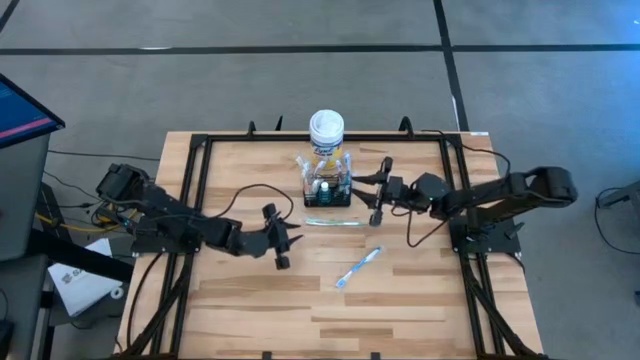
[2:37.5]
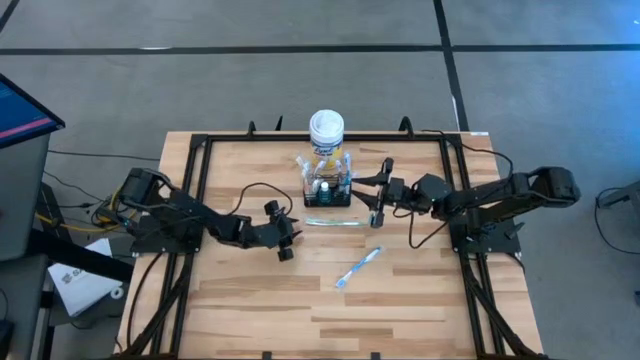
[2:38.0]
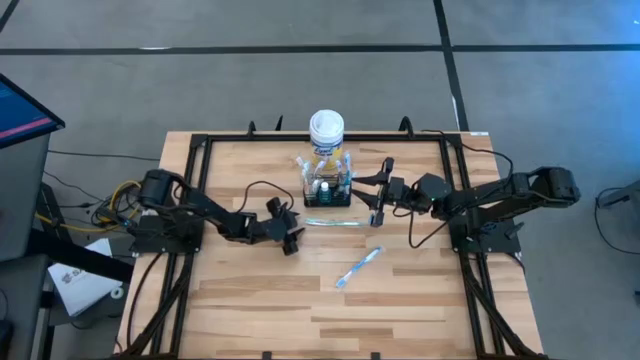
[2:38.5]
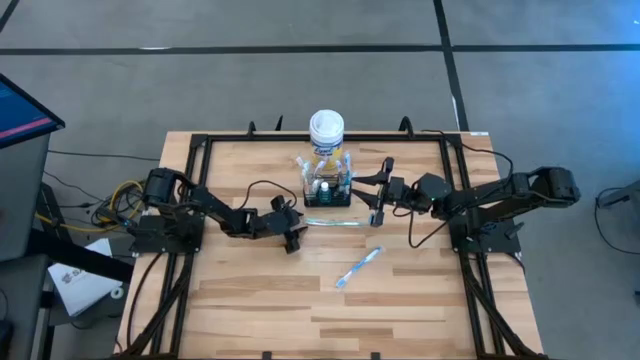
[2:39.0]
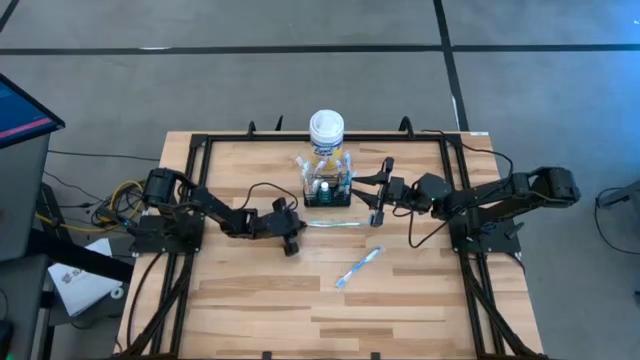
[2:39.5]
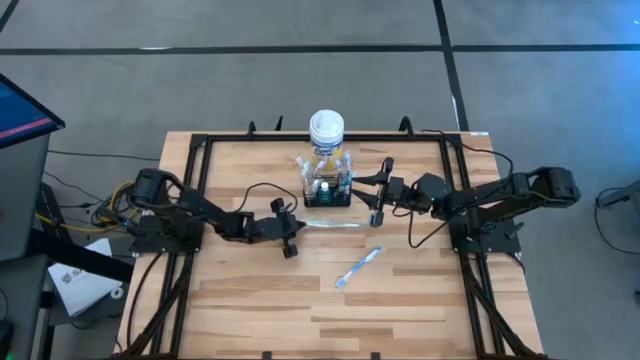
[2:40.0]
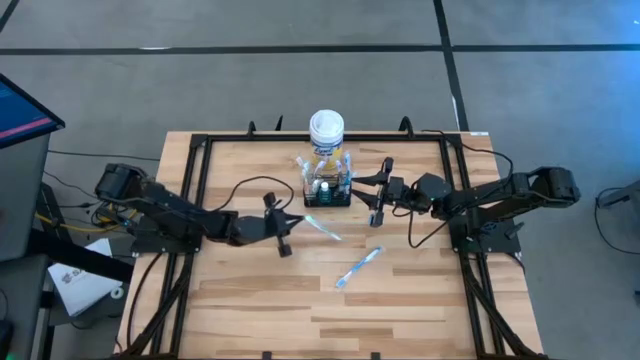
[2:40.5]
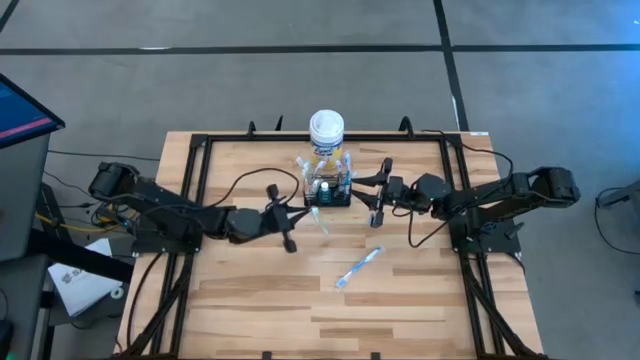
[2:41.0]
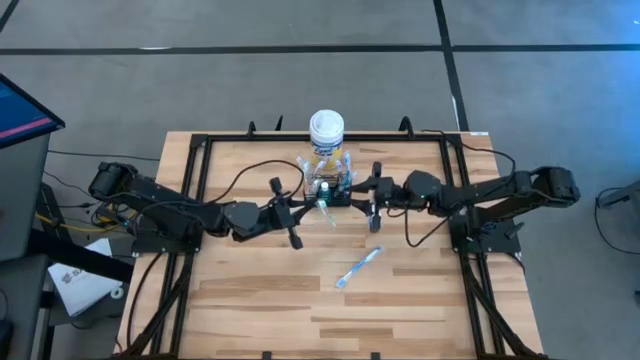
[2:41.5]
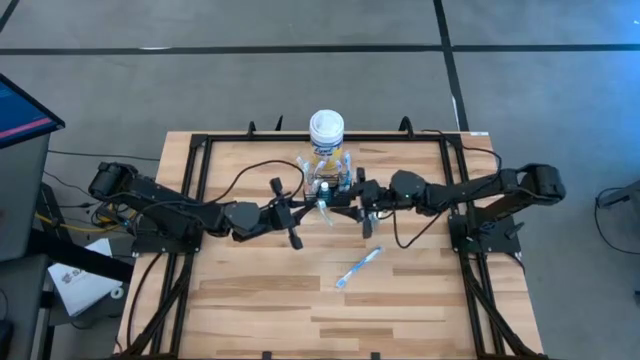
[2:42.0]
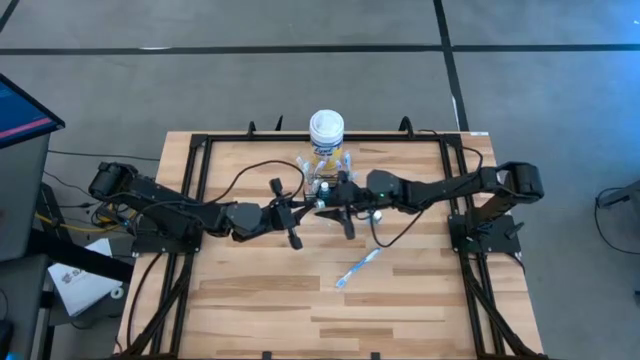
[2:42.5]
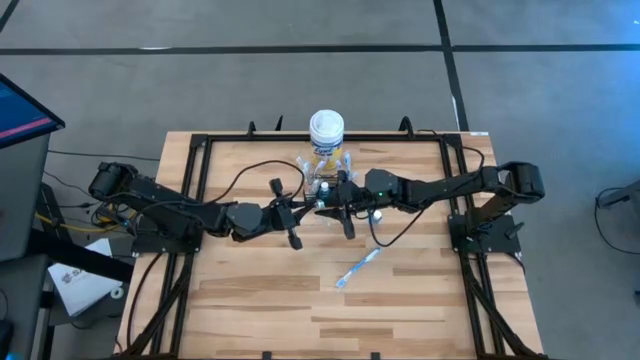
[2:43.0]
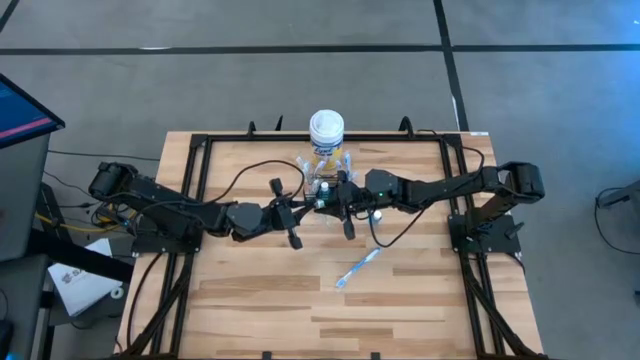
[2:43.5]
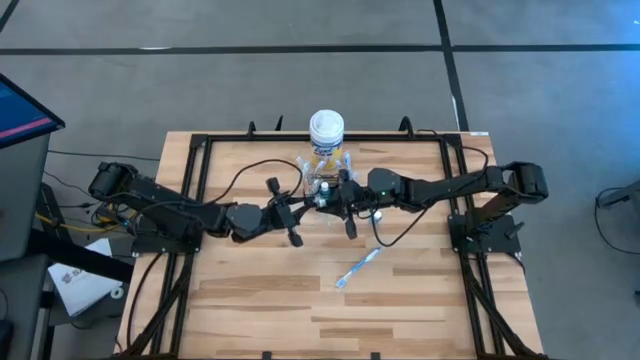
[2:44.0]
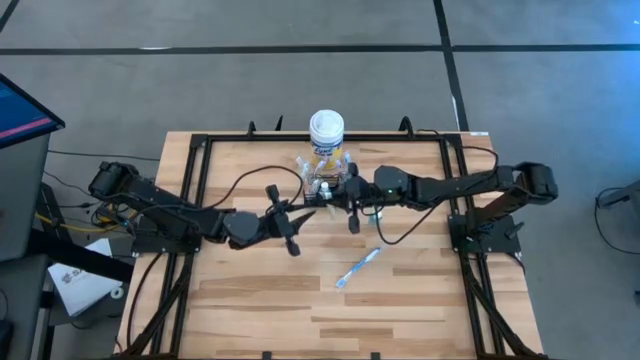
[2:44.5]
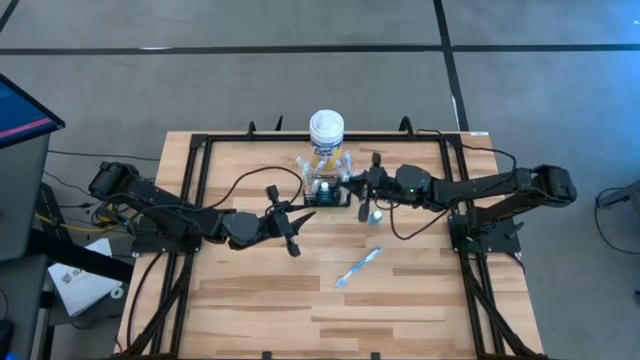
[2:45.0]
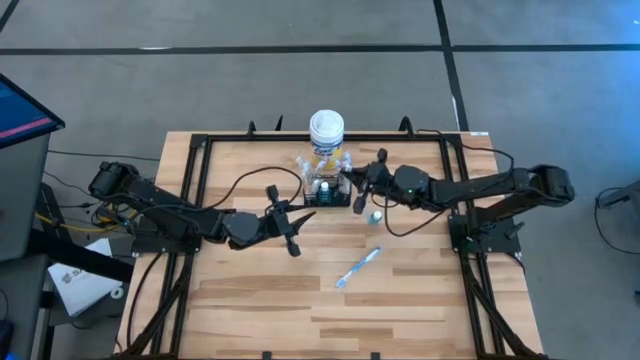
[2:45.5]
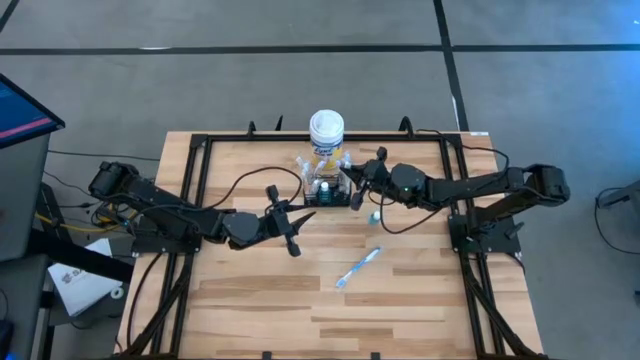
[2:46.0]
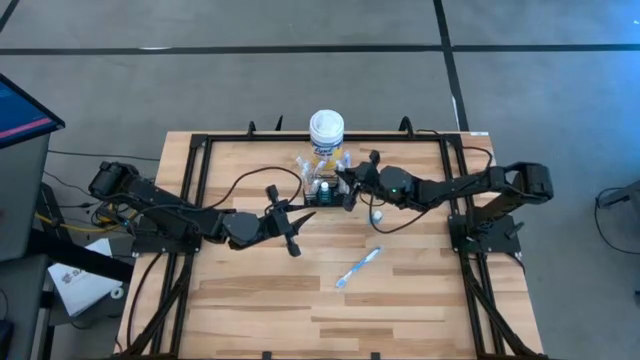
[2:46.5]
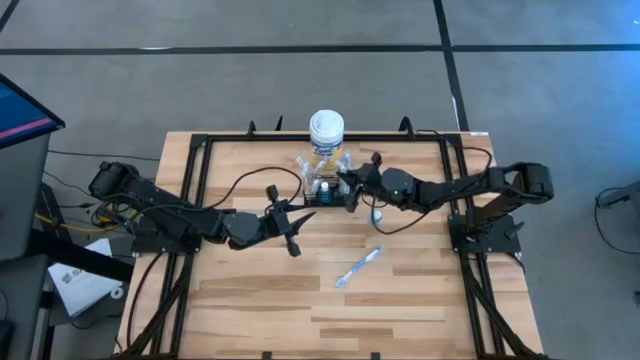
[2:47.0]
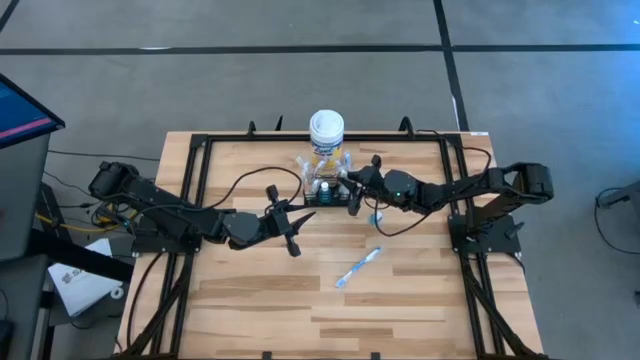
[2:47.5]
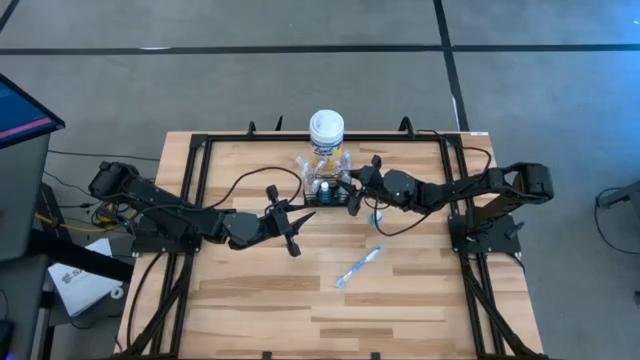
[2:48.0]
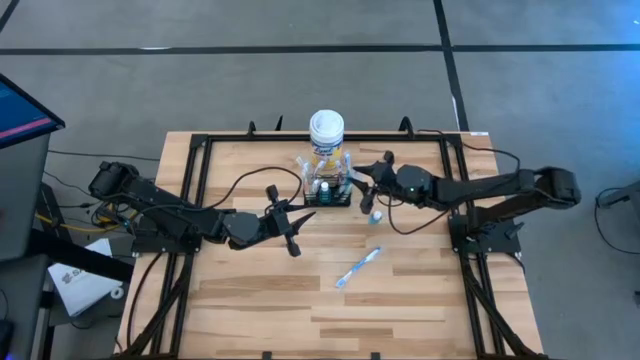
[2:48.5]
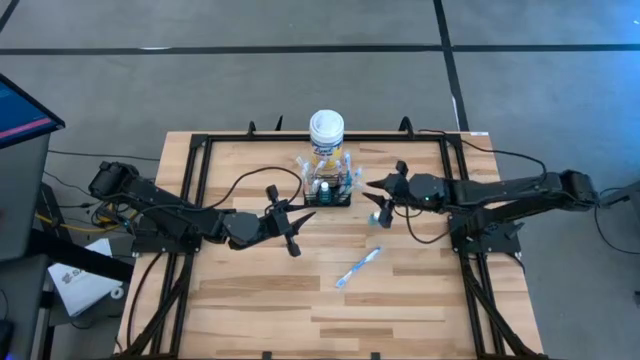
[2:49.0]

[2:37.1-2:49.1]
Task: Pick & Place toothbrushing station
Put the green toothbrush into the black wire organizer

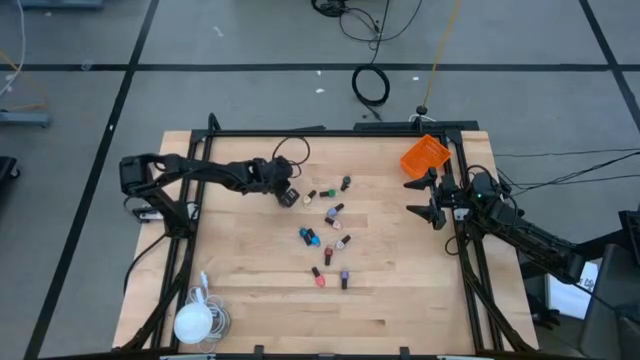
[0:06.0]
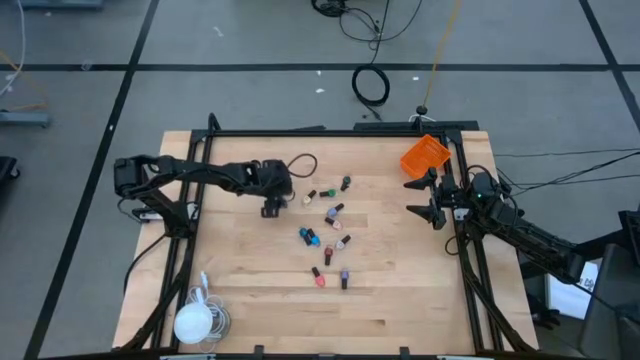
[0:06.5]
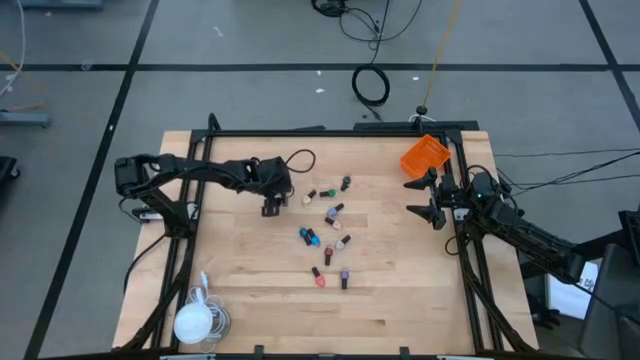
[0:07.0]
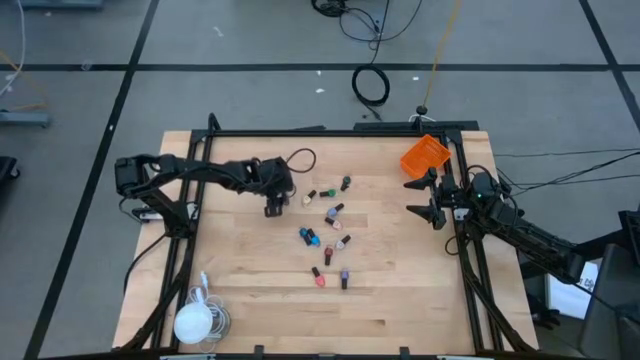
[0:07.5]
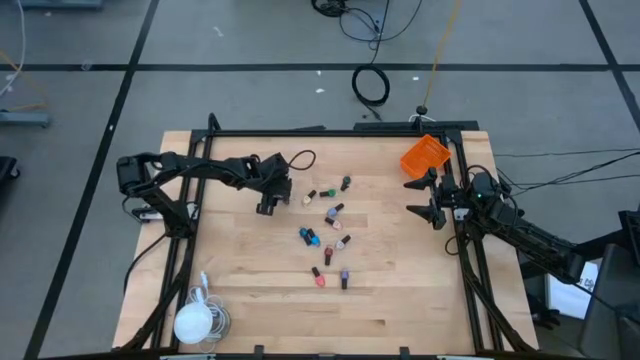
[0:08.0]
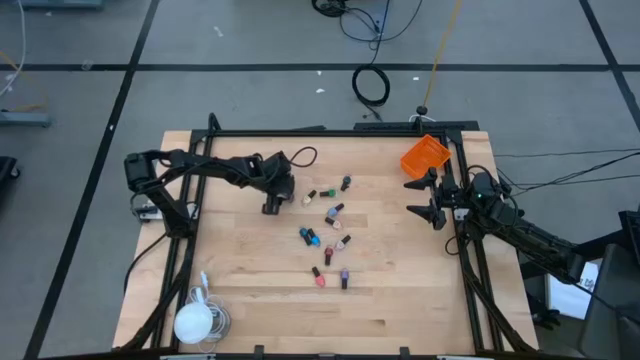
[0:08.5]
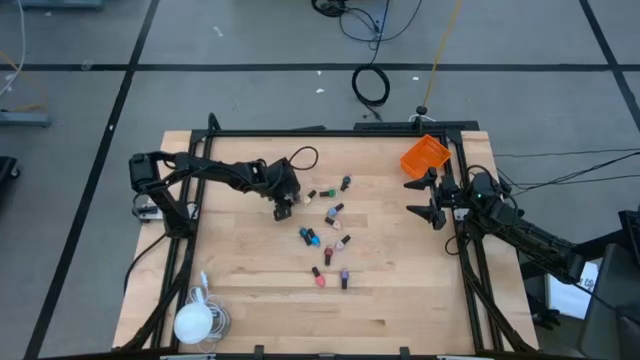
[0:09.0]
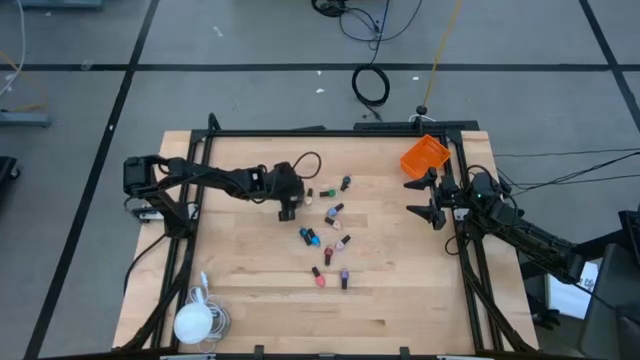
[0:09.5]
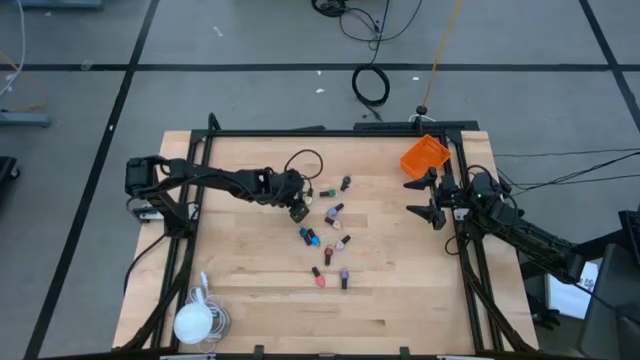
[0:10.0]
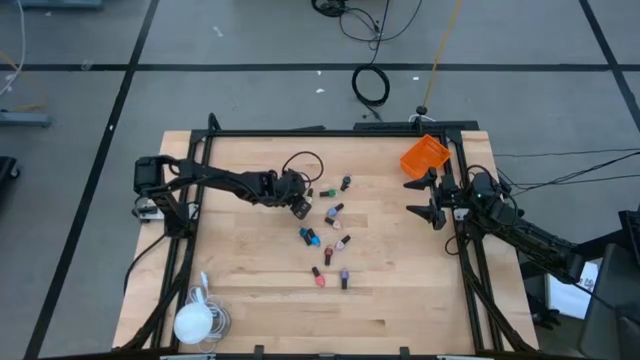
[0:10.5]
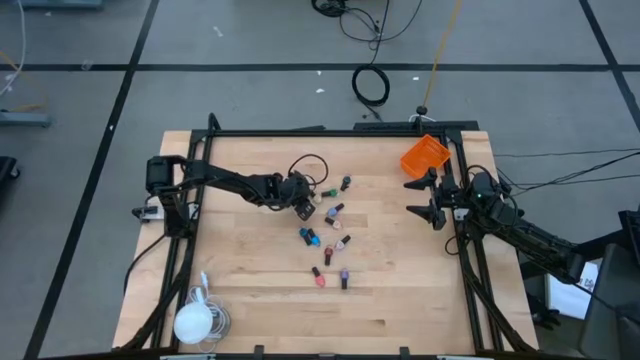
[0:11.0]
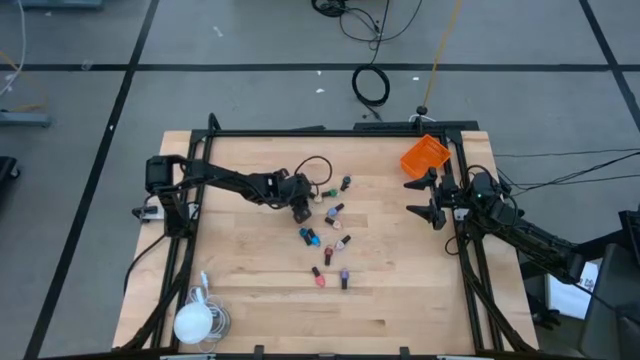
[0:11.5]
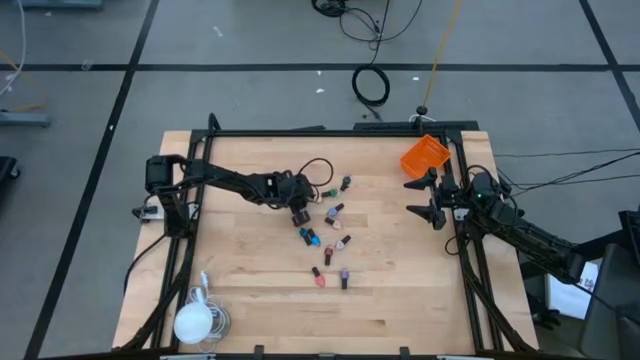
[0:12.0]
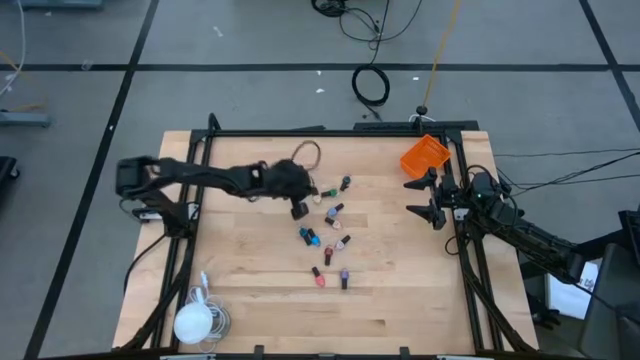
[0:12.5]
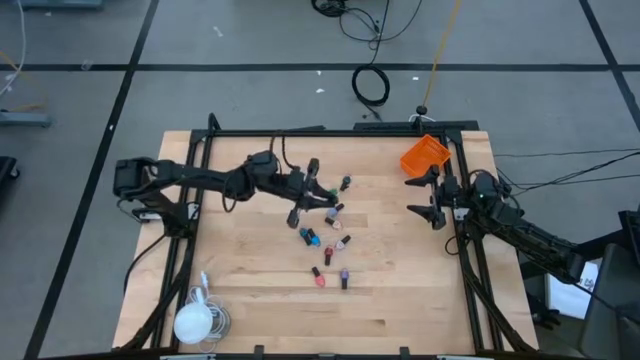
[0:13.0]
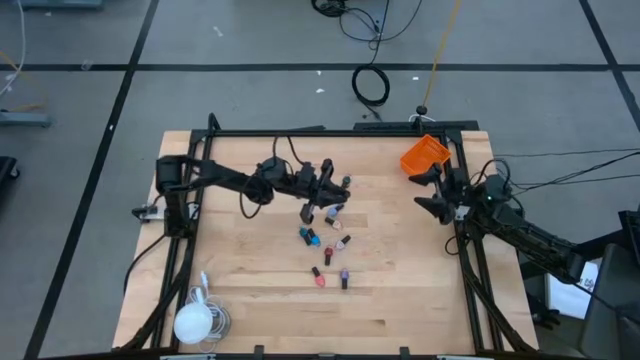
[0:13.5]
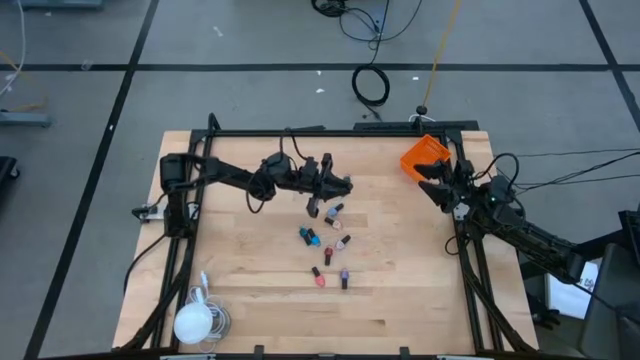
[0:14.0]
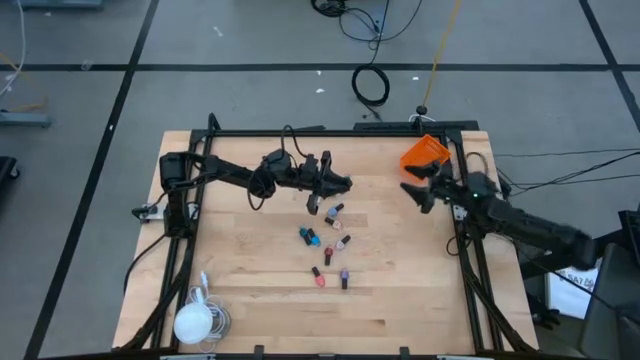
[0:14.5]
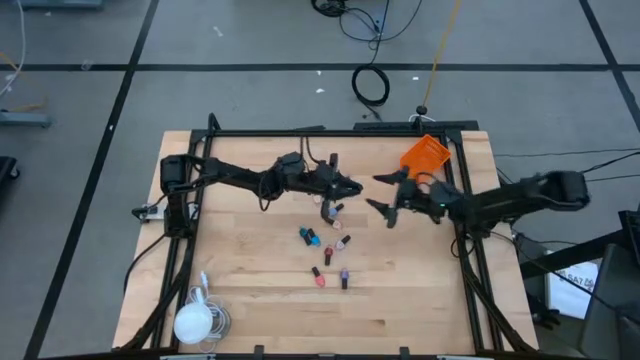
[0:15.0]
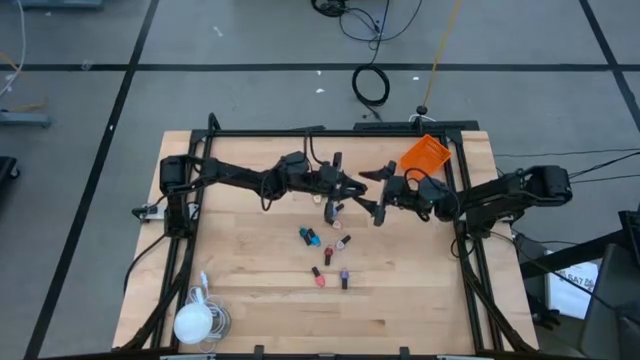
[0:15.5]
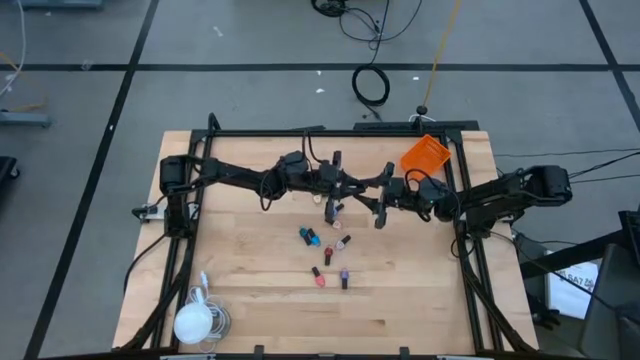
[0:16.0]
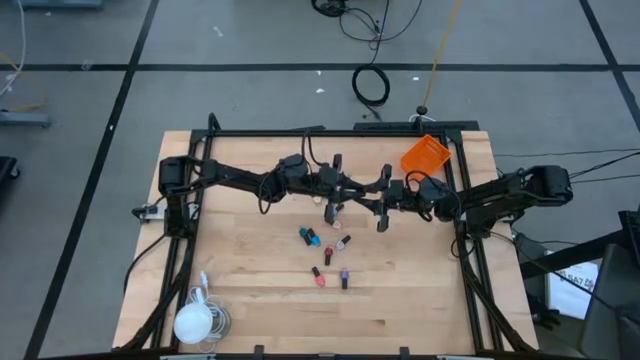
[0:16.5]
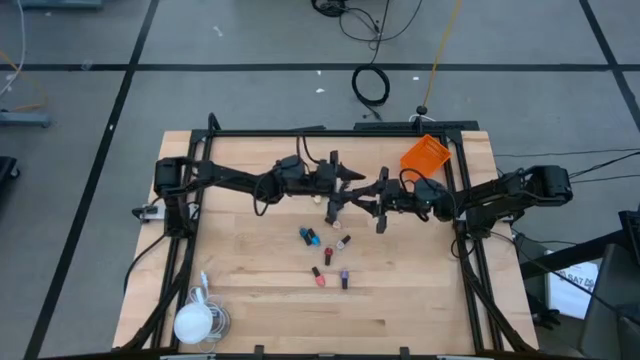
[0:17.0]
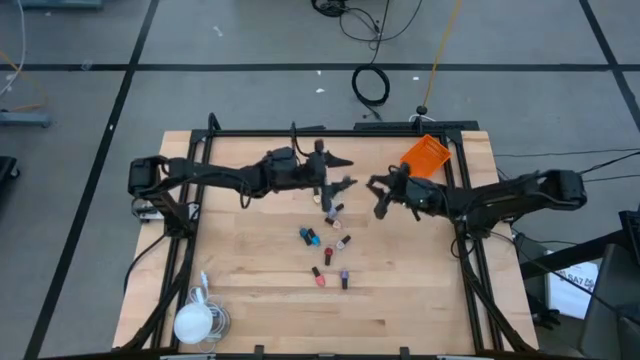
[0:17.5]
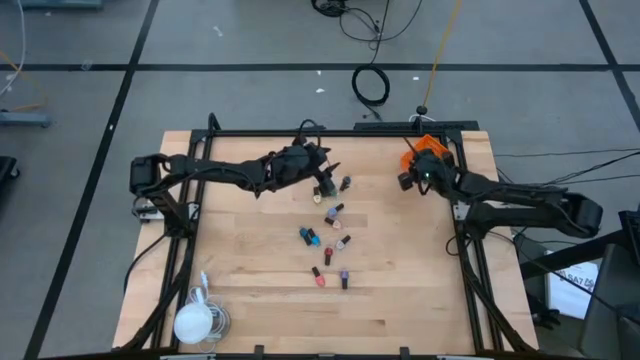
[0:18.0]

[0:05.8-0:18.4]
Task: Pick & Place Nail Polish
Put the top violet nail polish bottle into the orange basket
